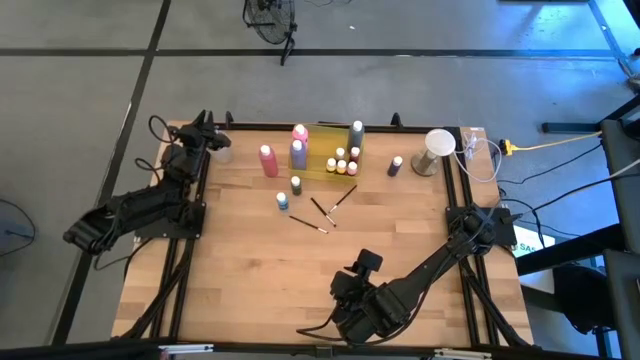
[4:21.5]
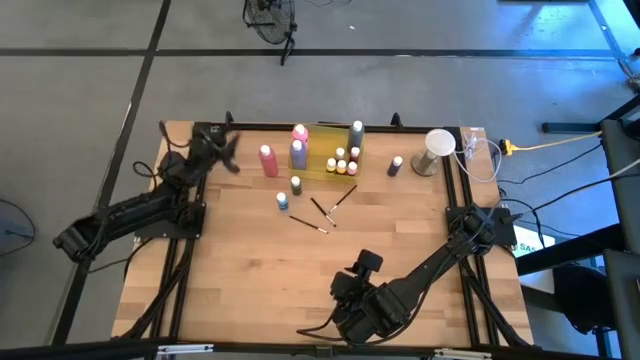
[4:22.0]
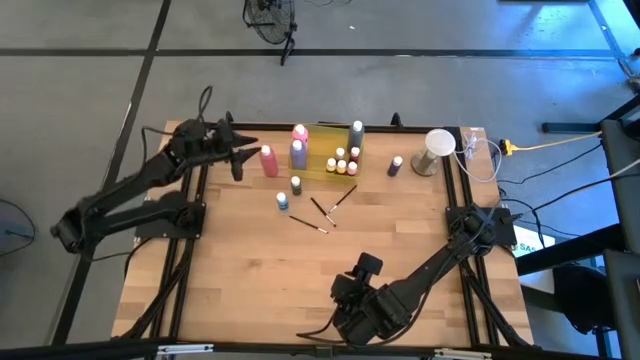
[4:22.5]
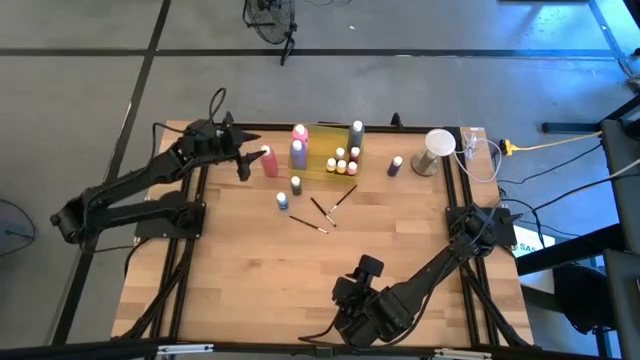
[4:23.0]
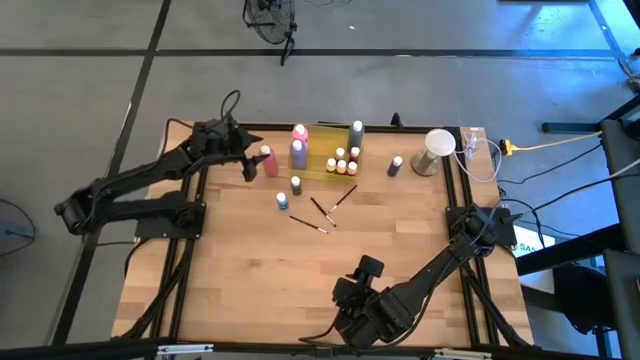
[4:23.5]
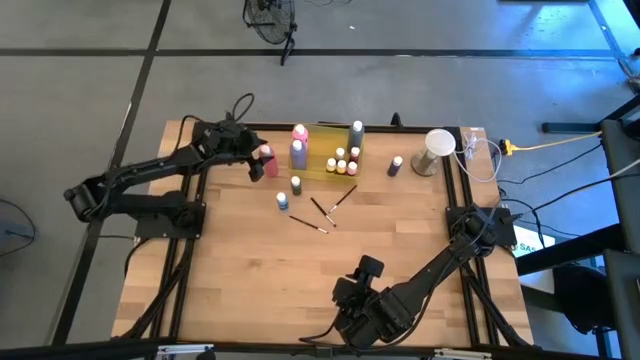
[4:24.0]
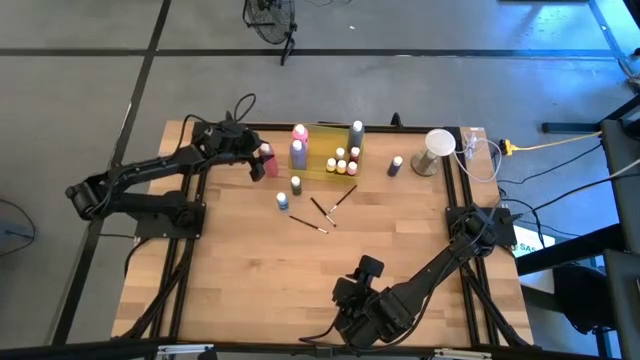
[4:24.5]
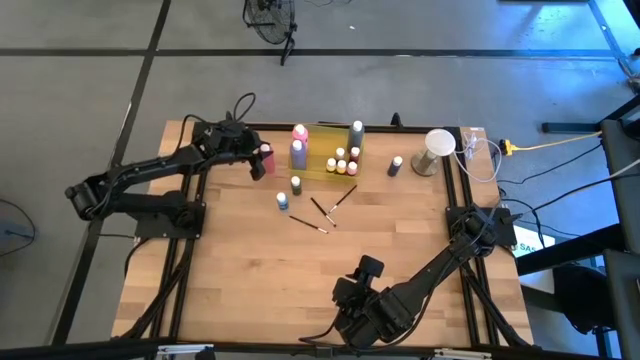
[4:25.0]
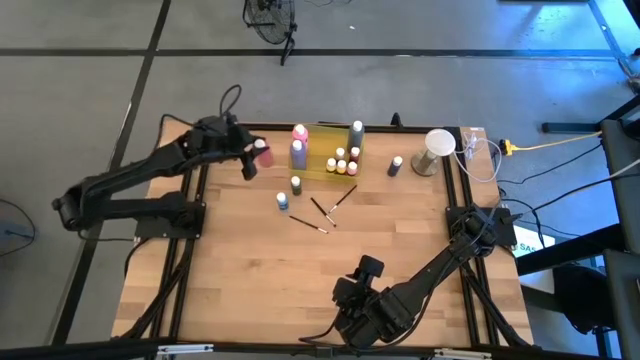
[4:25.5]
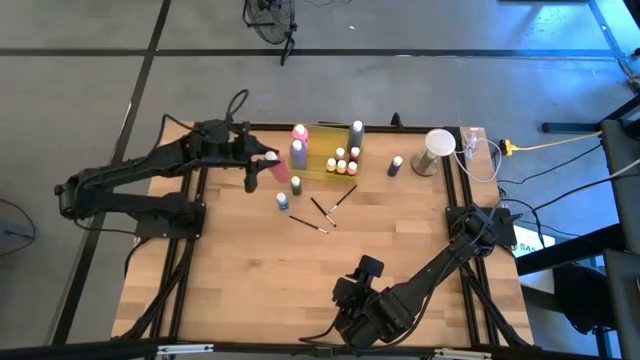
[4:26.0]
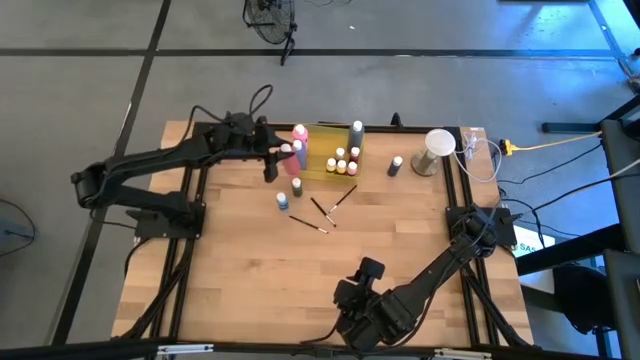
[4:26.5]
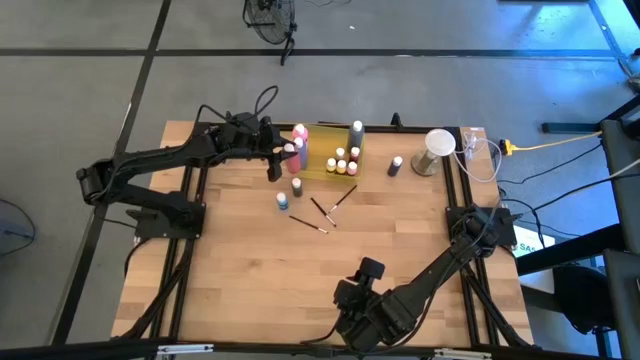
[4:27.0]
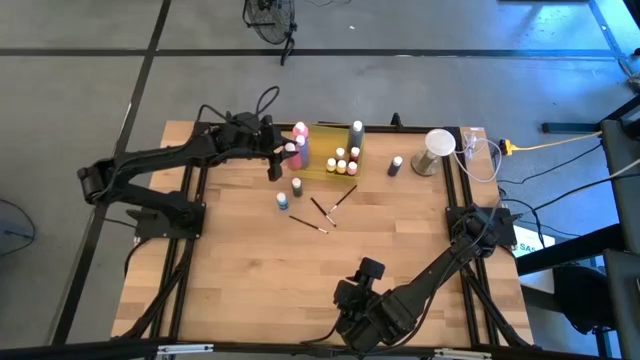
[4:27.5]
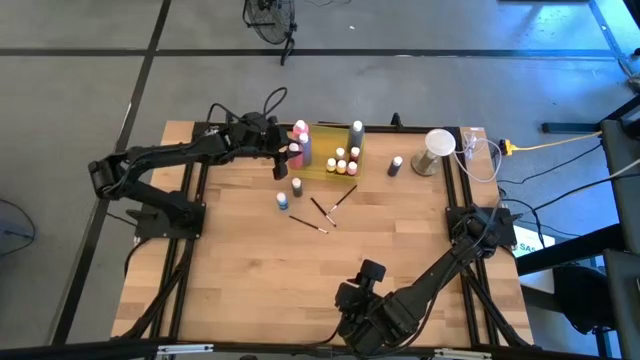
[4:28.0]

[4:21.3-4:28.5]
Task: Pick & Place Paint Supplies
Put the large dark pink paint bottle into the yellow bin

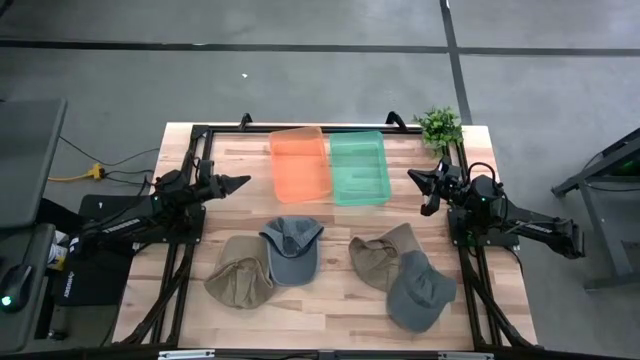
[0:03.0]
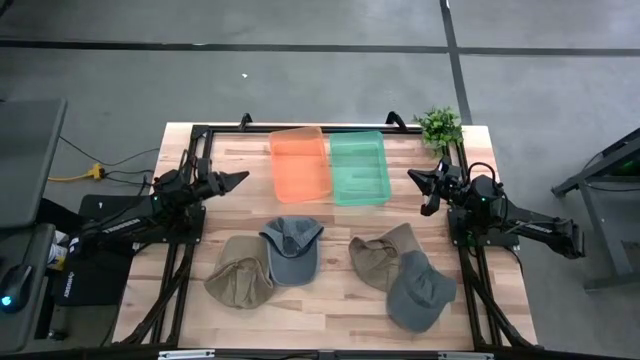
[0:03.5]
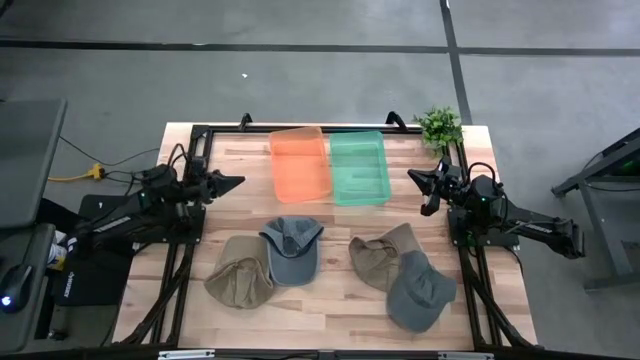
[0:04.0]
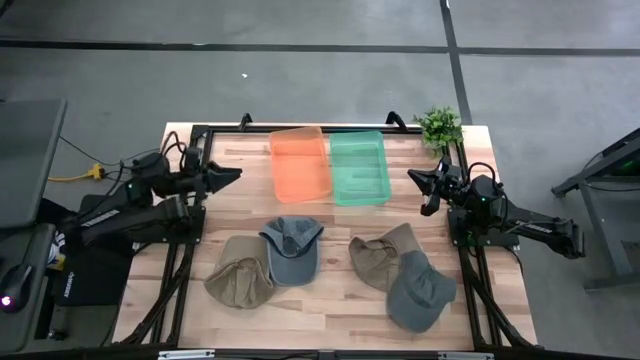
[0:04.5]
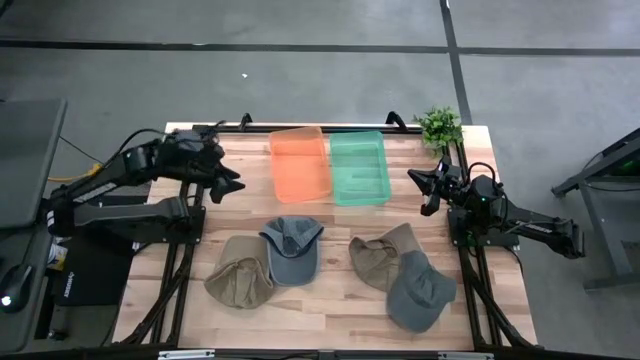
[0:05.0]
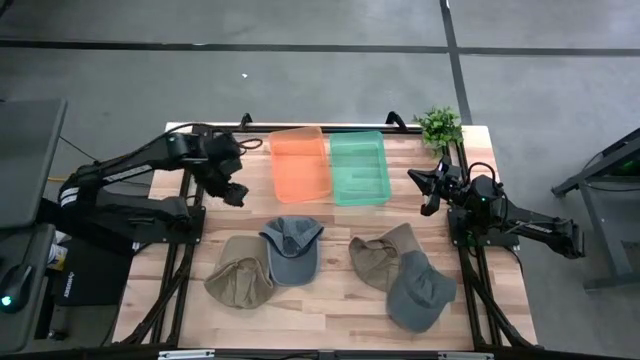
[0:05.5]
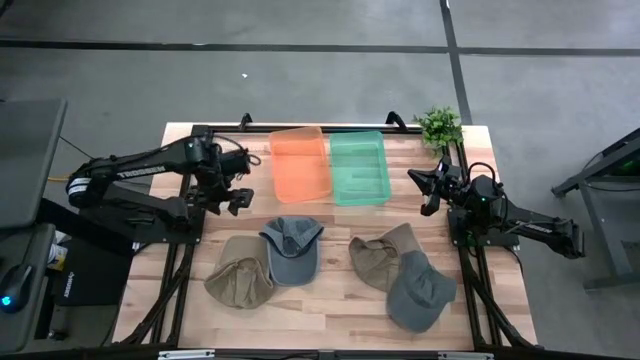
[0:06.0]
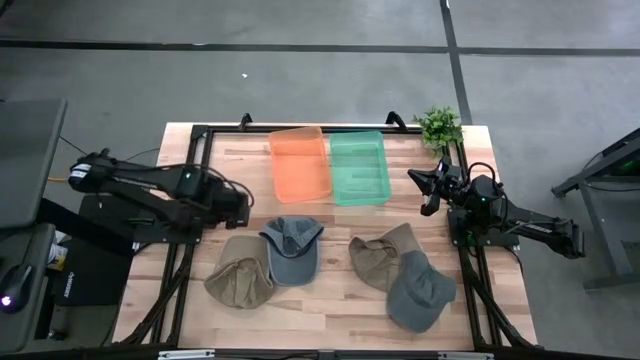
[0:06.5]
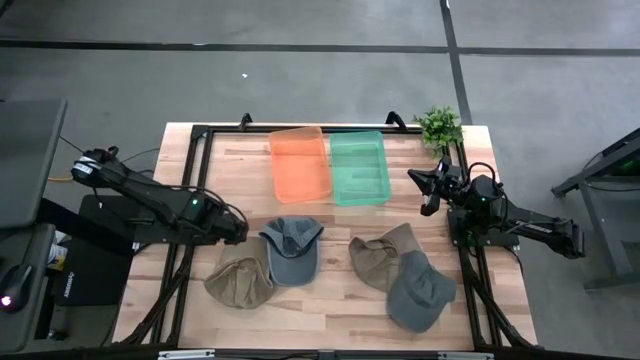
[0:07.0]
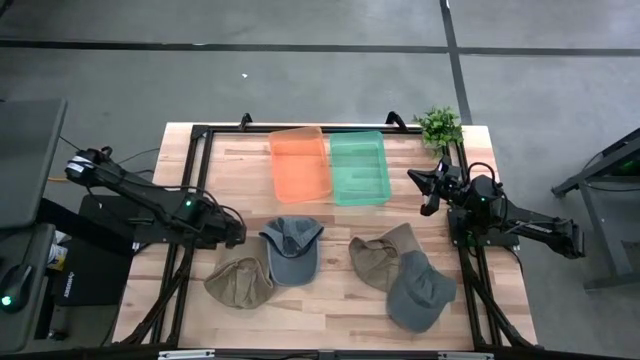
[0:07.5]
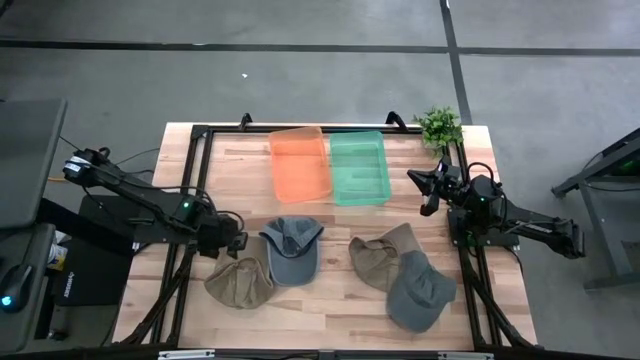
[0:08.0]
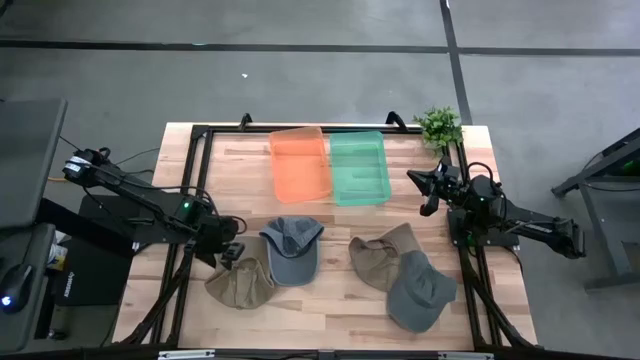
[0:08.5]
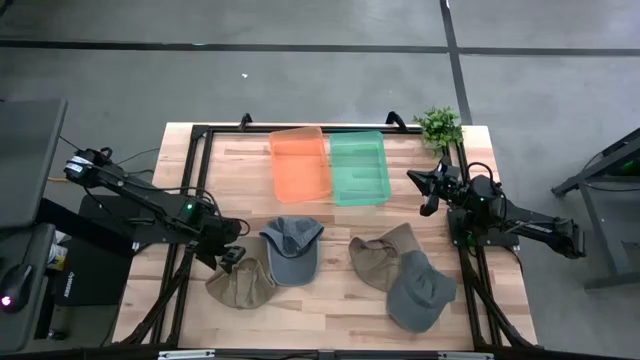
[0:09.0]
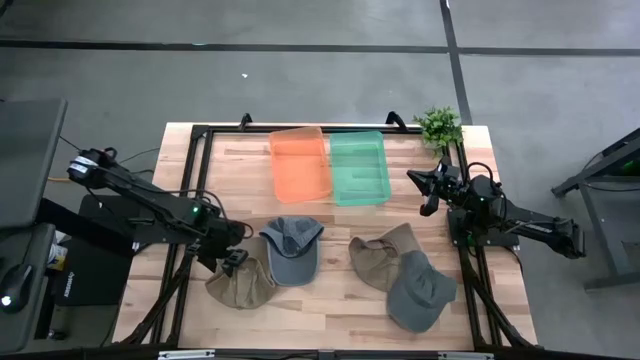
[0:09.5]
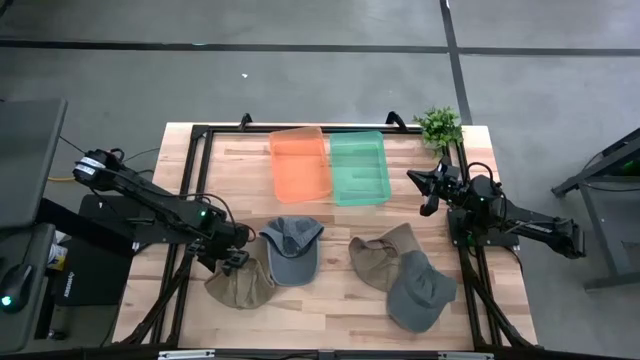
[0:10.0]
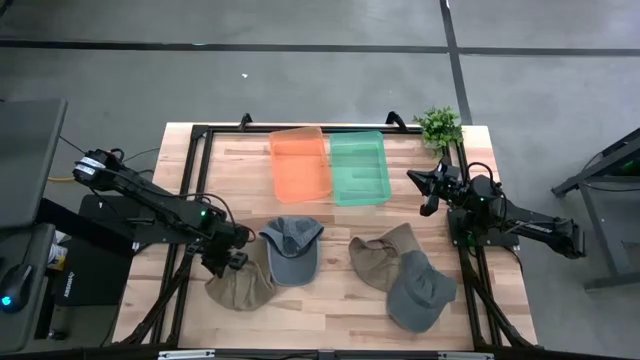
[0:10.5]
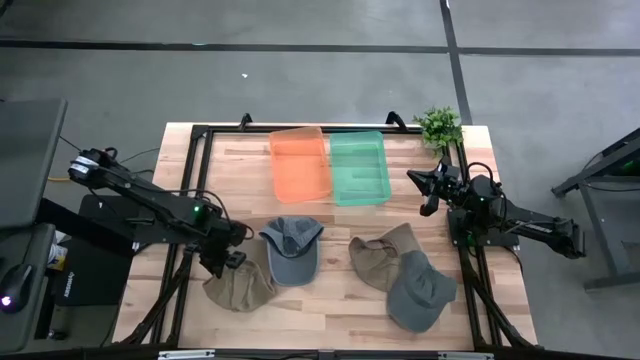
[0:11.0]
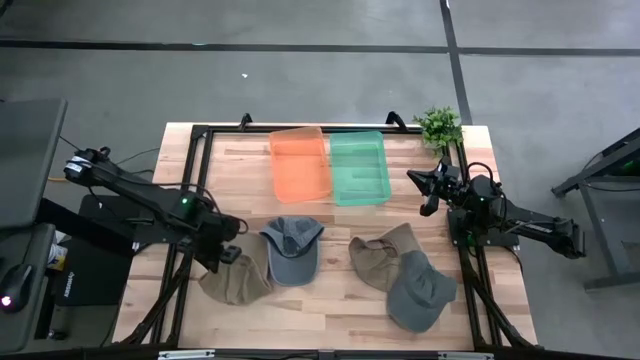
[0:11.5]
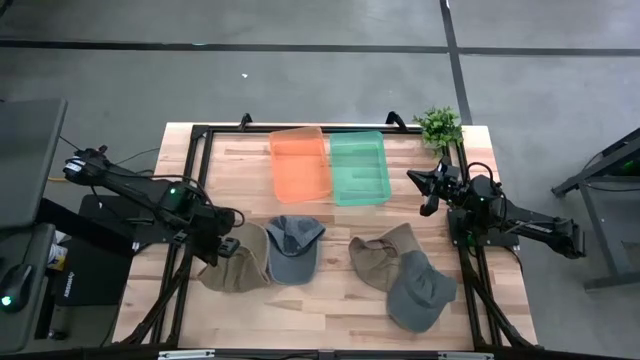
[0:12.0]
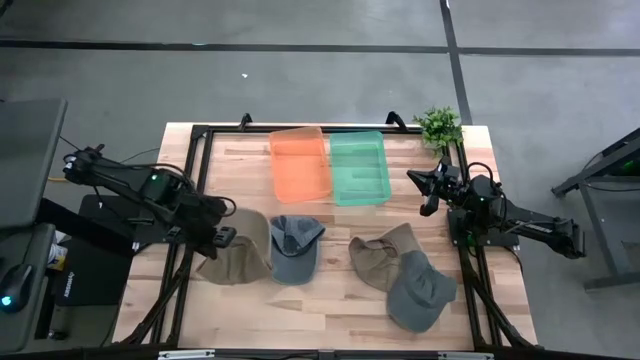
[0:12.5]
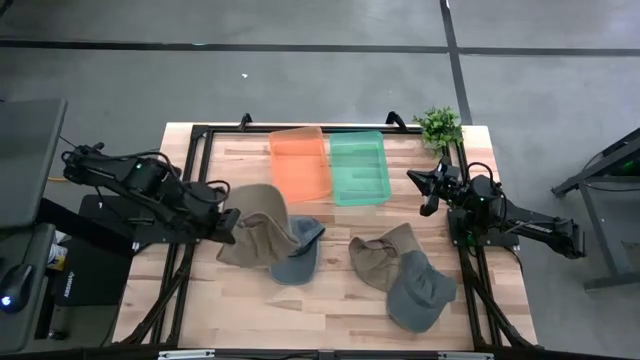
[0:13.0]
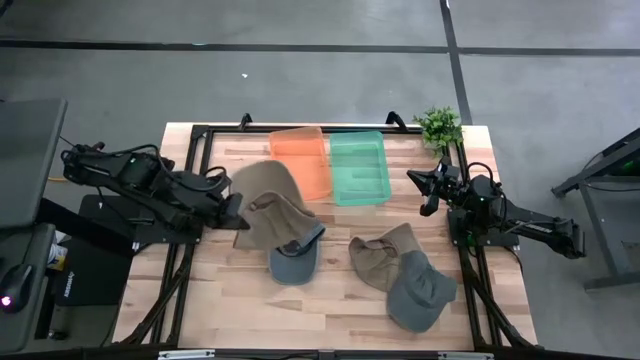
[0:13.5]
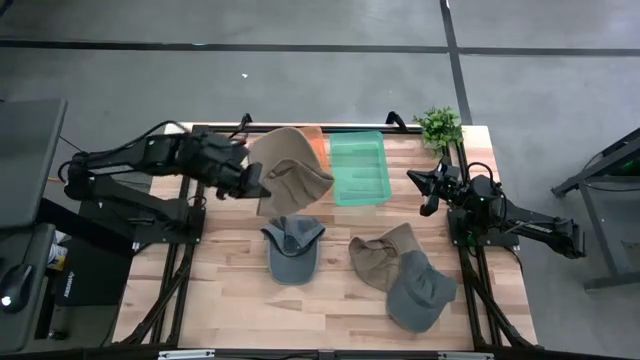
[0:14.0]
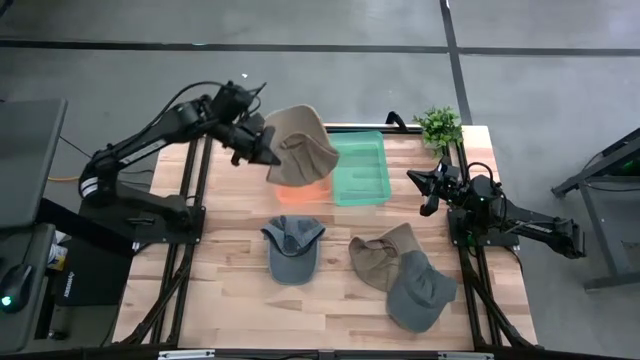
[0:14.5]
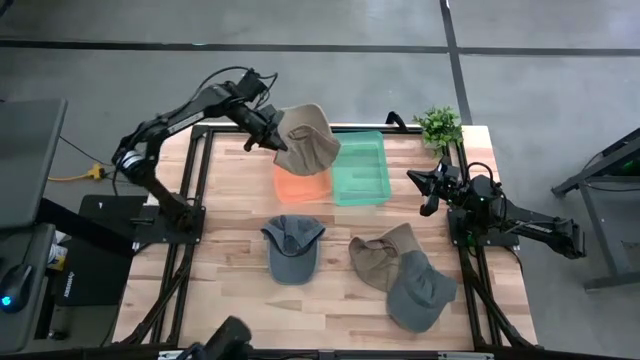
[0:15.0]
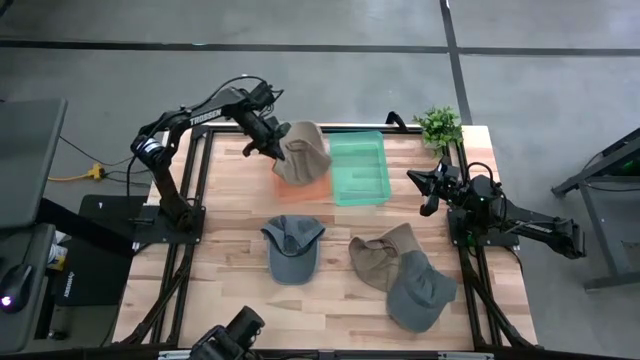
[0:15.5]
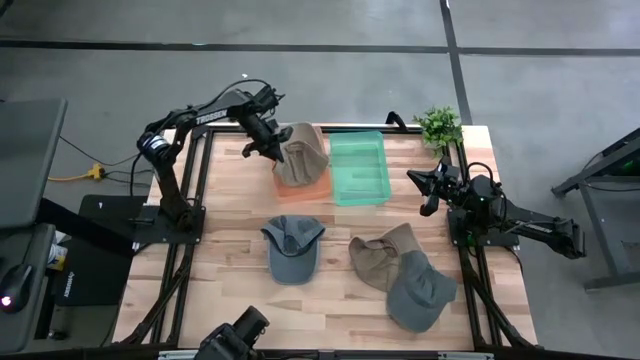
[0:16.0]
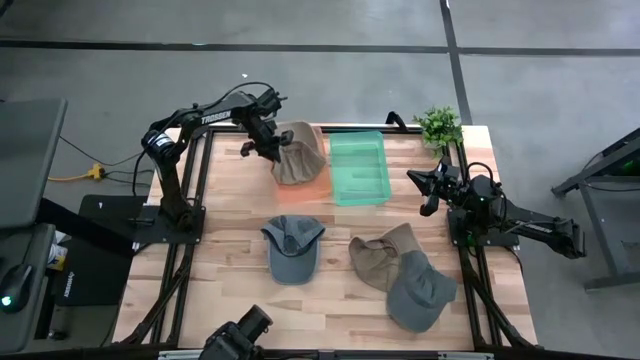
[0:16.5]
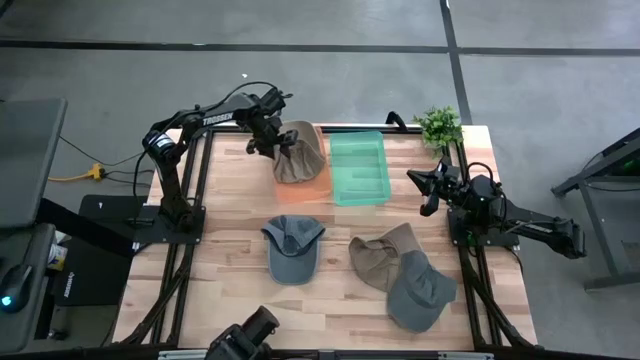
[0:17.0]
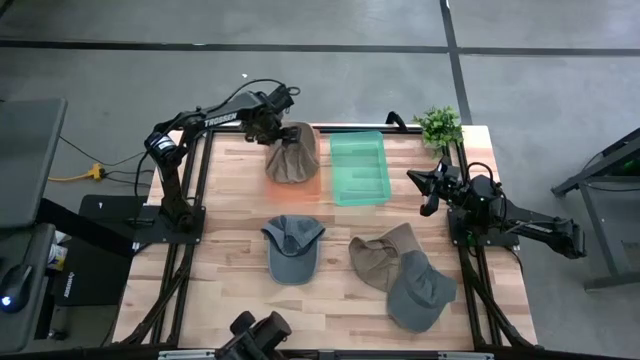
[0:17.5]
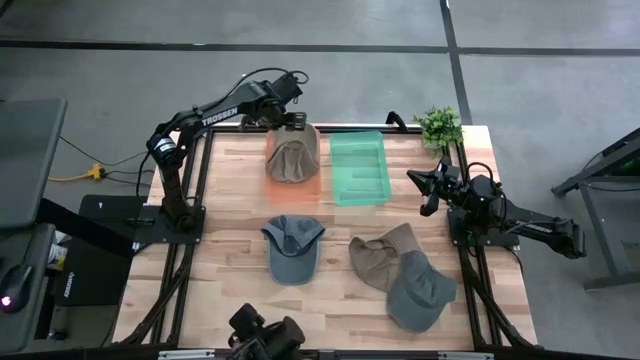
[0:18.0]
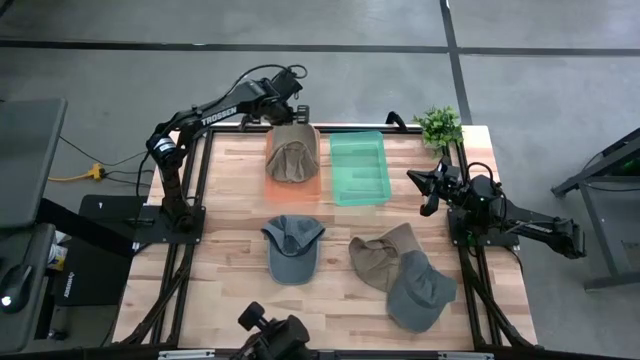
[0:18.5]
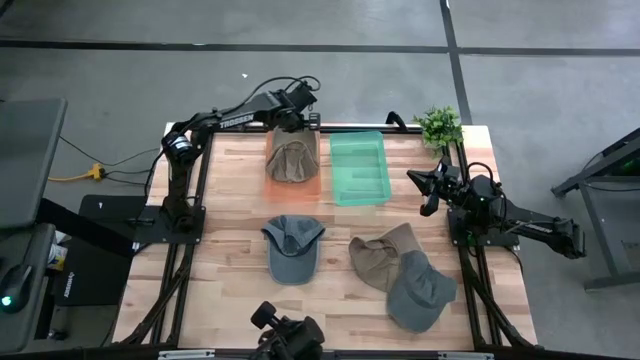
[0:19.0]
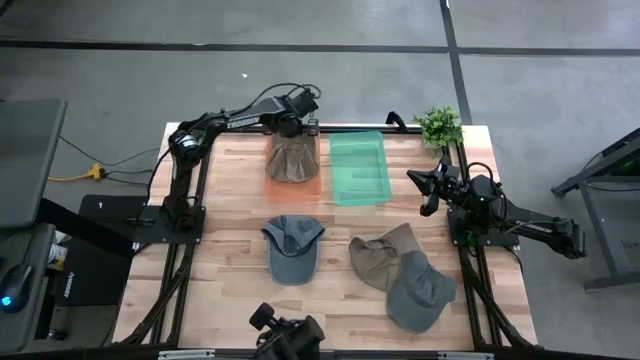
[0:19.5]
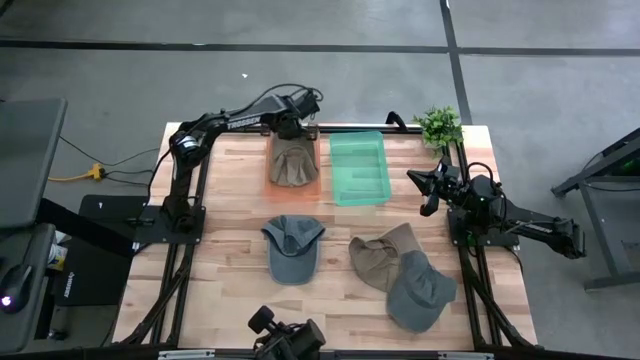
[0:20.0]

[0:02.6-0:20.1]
Task: Pick & Place hat
Put the left brown cap into the orange bin
